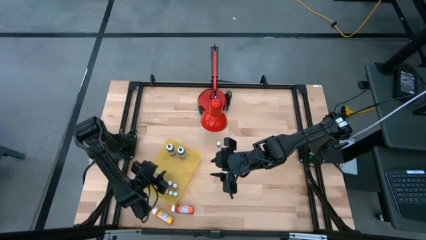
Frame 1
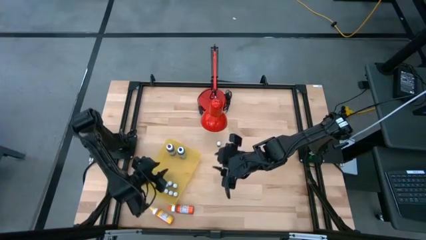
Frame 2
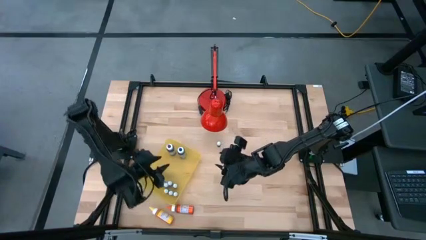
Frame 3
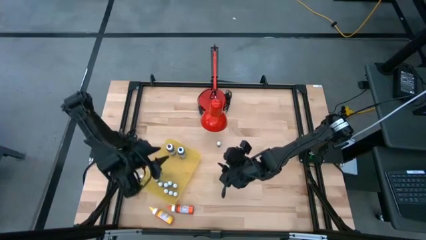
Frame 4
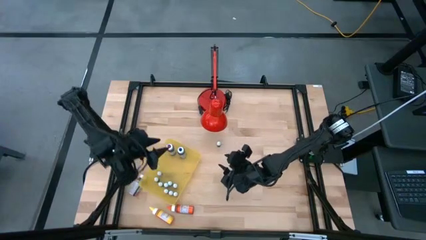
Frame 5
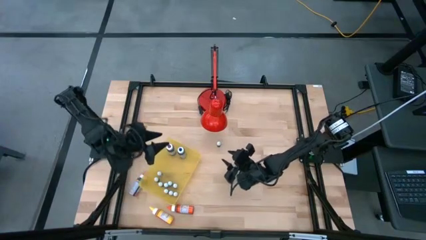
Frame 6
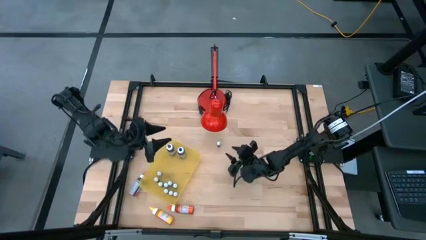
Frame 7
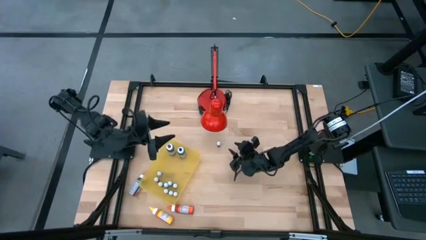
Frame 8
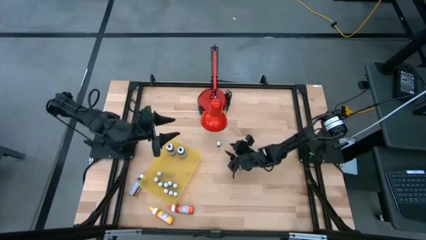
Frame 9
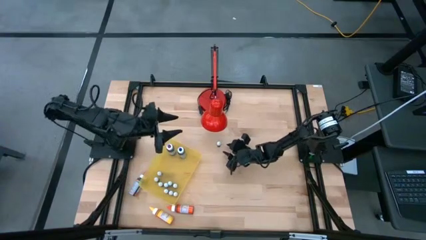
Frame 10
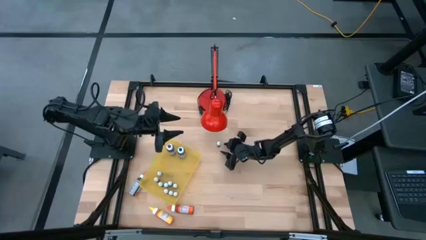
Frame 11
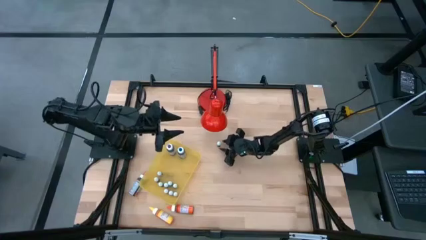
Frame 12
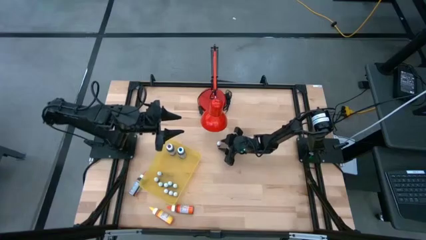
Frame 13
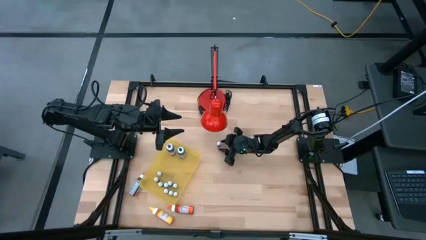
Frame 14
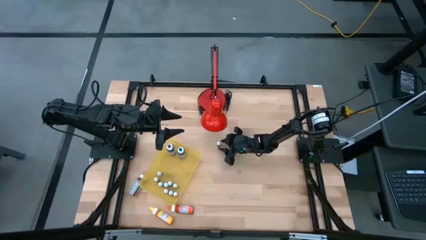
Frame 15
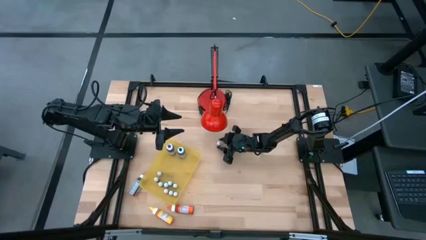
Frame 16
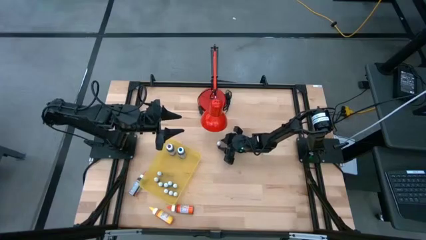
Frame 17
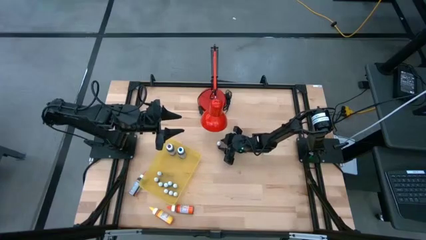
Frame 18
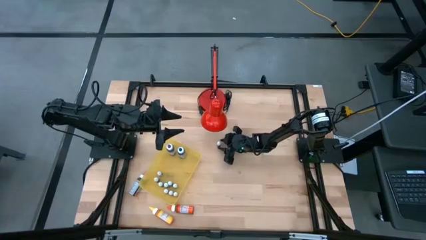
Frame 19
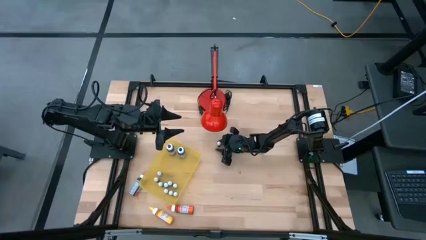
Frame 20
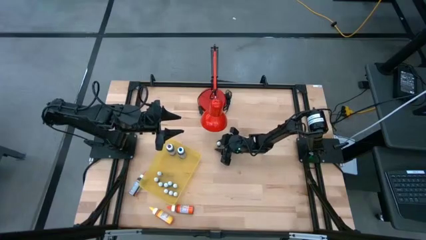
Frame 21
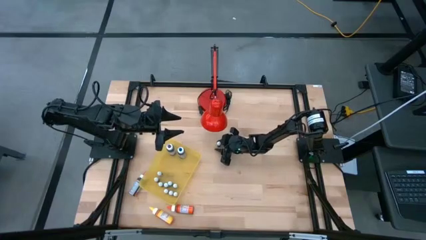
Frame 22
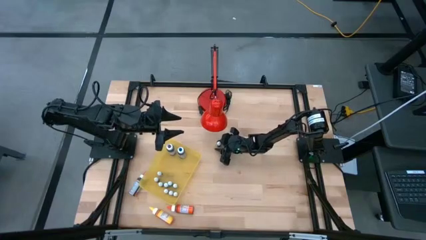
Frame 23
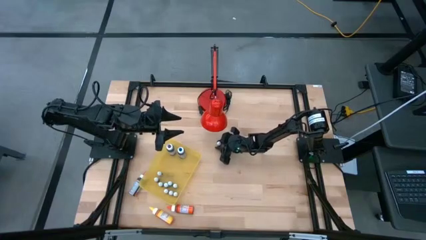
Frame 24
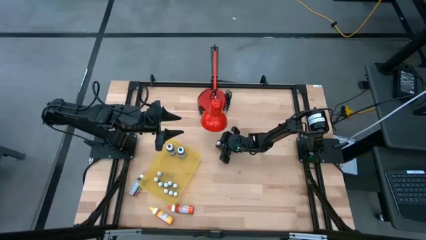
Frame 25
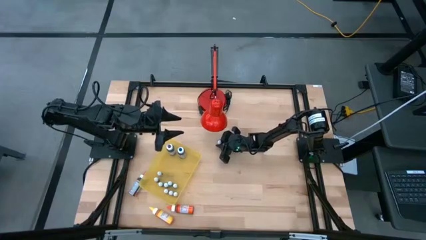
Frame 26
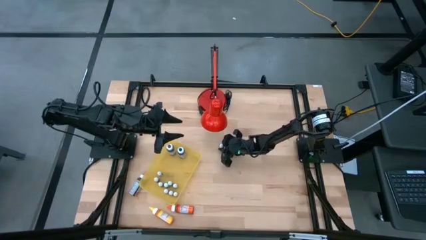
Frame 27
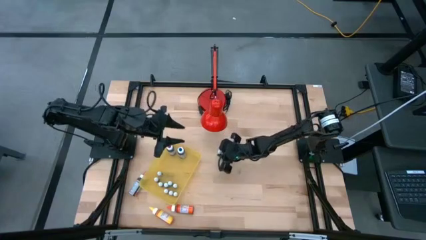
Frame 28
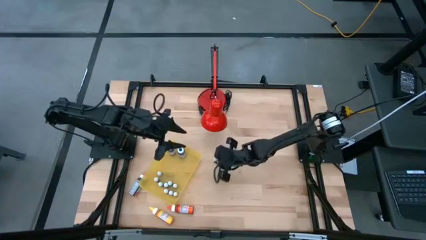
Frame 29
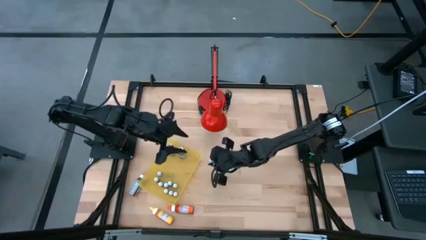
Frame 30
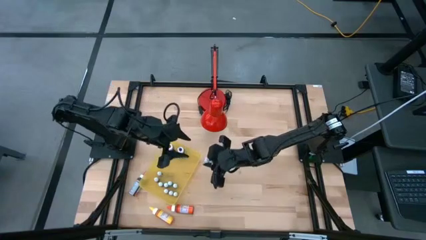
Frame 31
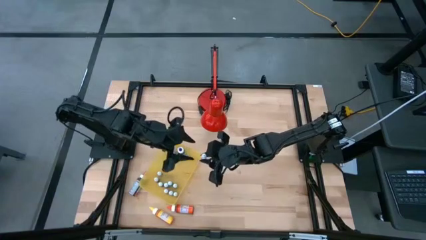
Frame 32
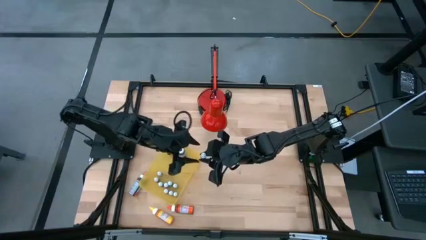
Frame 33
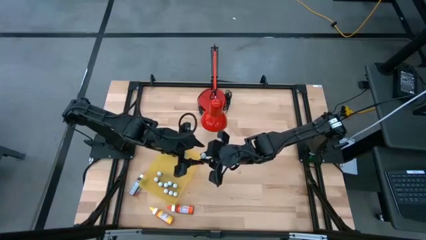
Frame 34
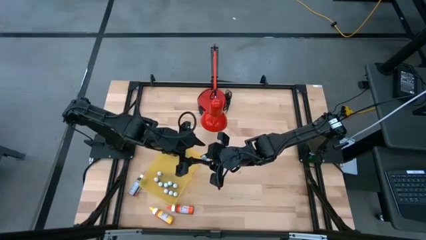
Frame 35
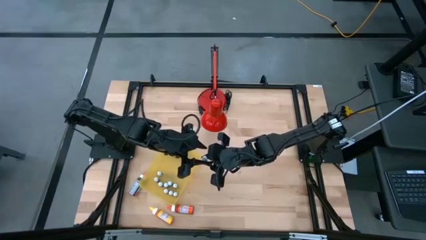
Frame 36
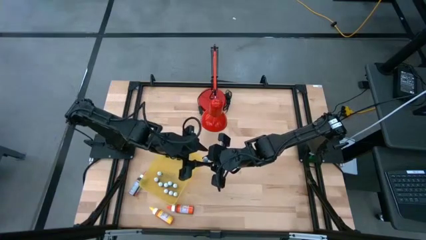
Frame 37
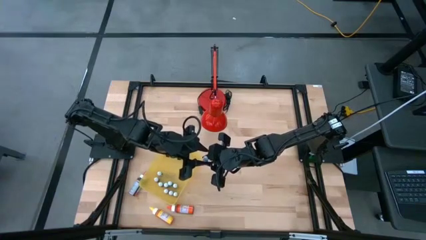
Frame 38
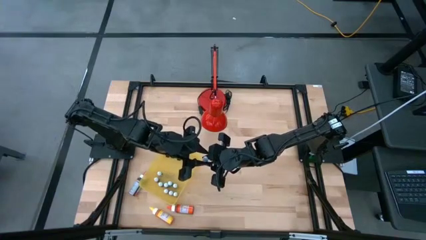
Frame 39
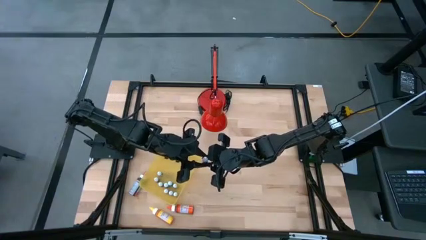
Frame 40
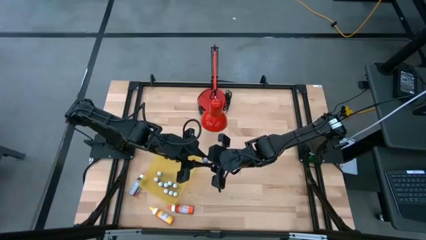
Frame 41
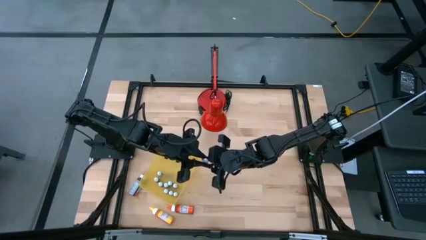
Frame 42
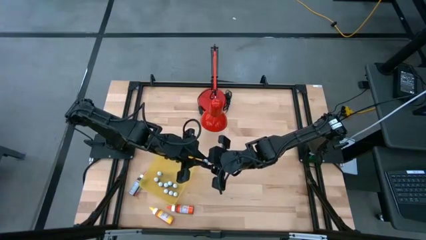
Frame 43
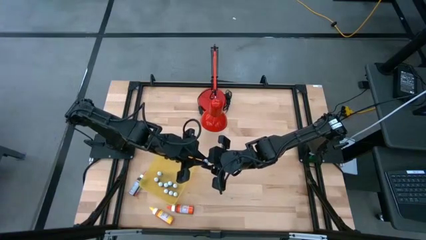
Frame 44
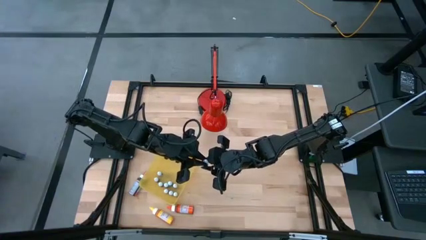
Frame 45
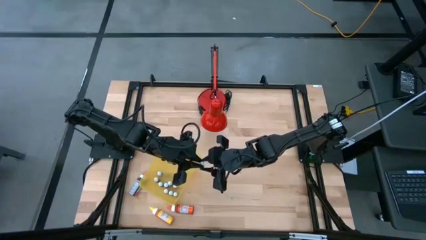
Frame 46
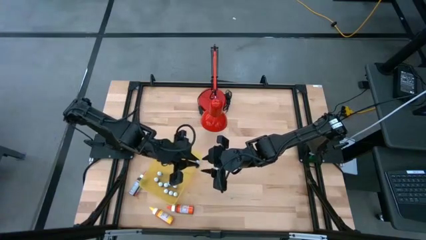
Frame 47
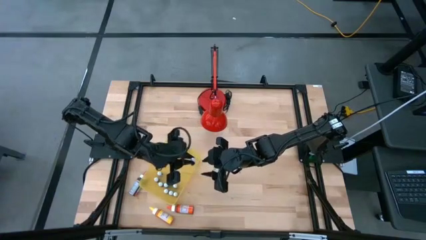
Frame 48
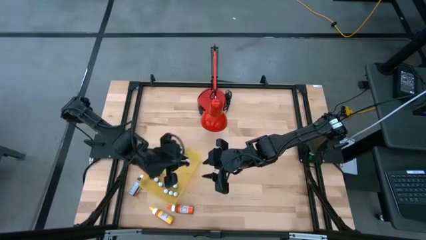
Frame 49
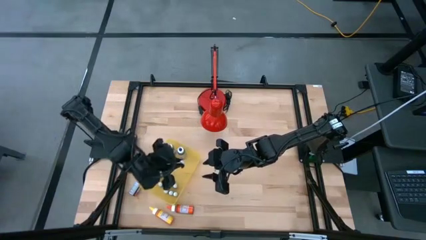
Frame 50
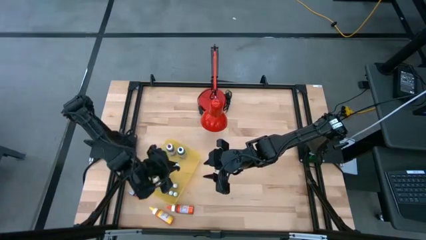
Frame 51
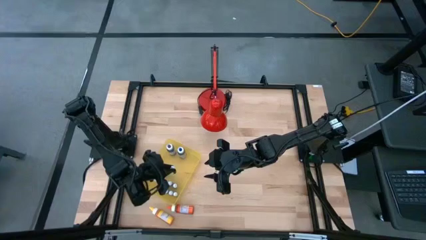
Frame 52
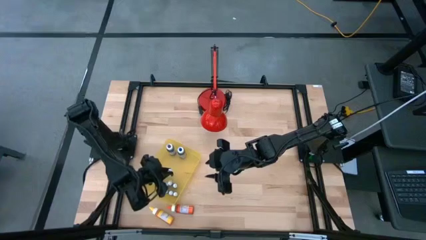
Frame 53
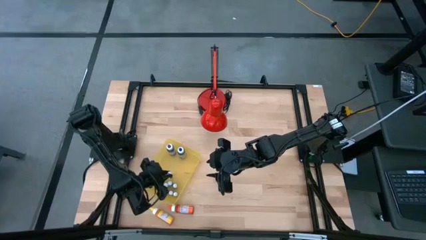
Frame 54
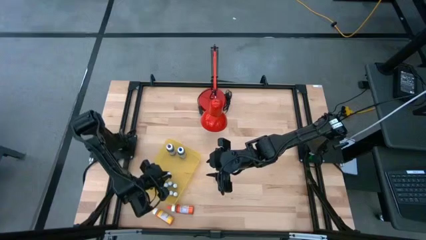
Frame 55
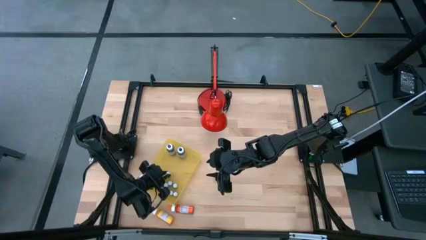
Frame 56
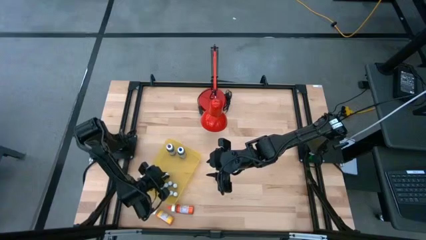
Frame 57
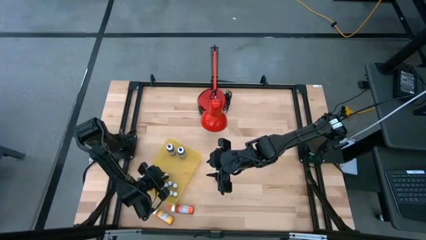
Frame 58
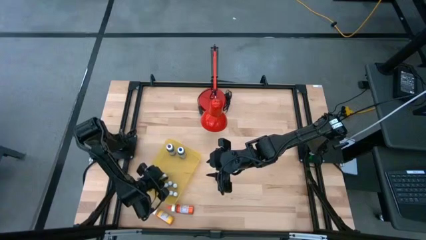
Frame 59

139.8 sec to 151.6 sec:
Task: Pick & Place food coloring
Put the small light green food coloring bottle into the yellow bin

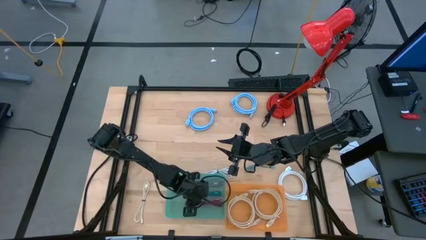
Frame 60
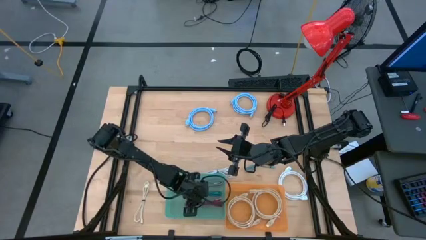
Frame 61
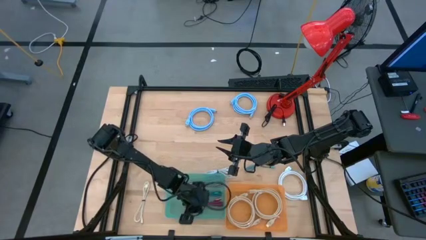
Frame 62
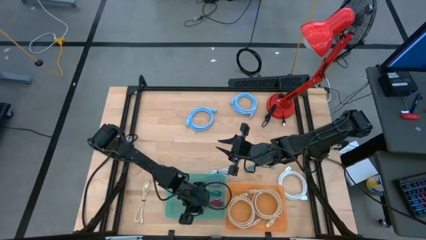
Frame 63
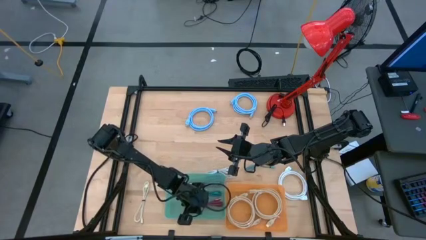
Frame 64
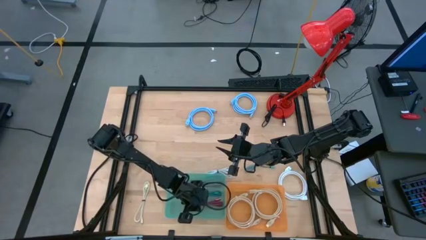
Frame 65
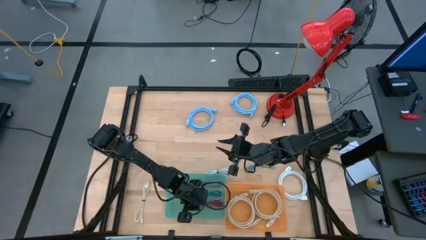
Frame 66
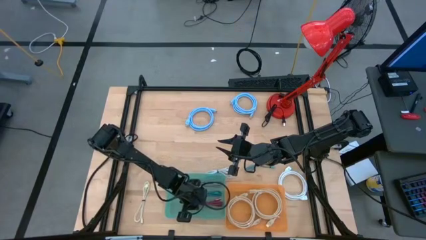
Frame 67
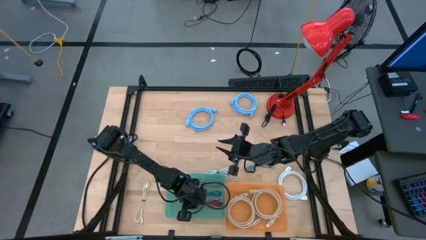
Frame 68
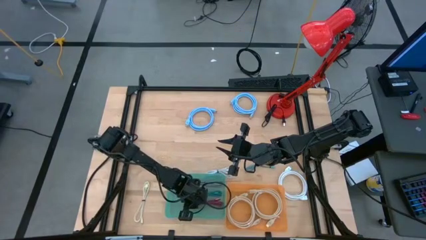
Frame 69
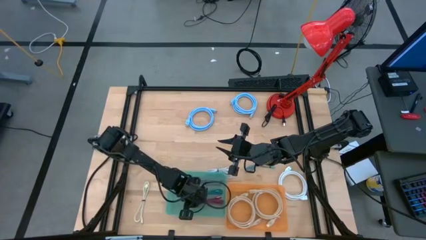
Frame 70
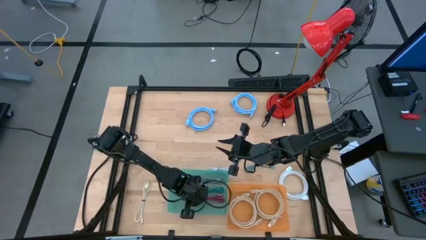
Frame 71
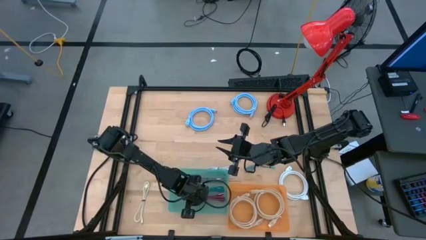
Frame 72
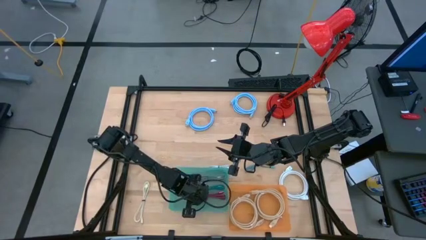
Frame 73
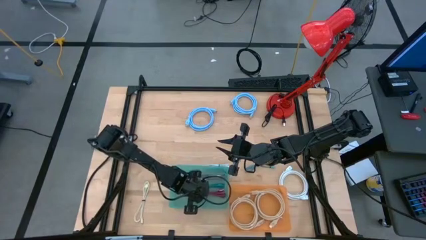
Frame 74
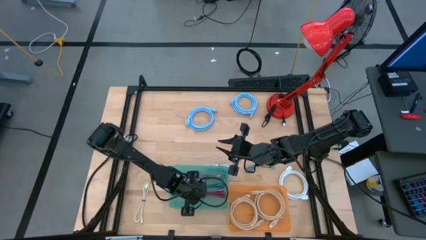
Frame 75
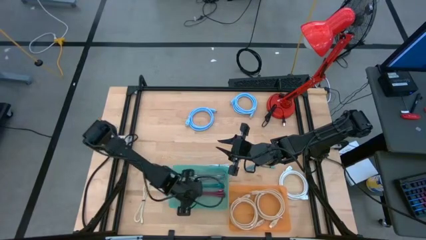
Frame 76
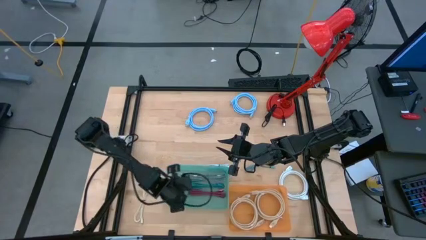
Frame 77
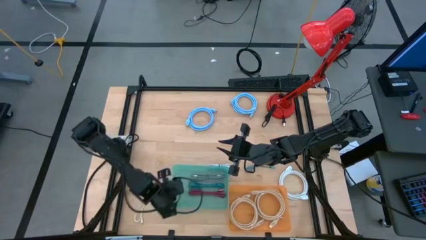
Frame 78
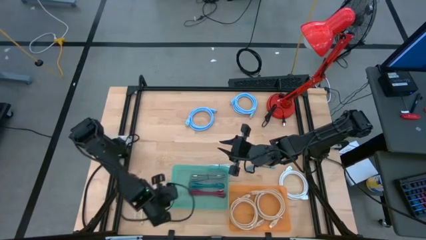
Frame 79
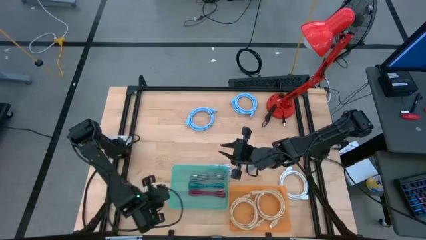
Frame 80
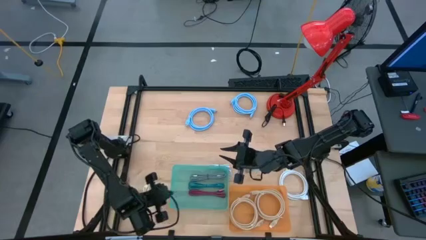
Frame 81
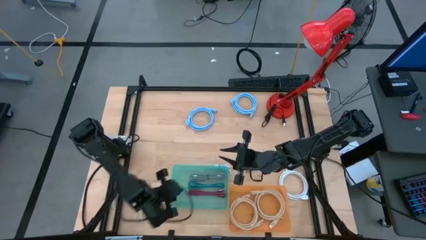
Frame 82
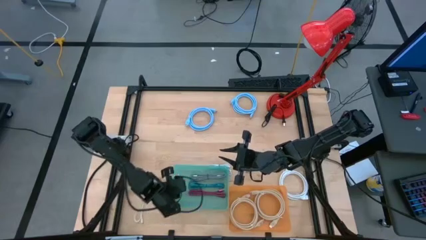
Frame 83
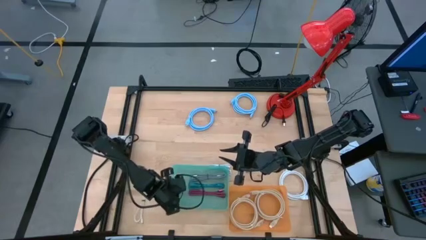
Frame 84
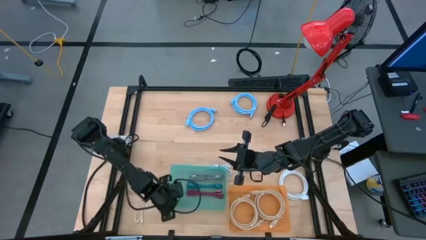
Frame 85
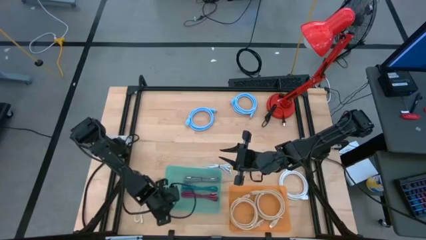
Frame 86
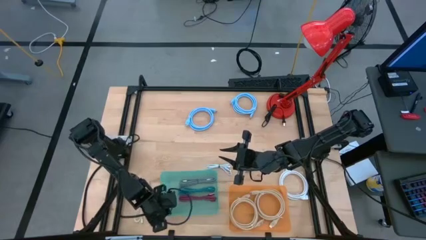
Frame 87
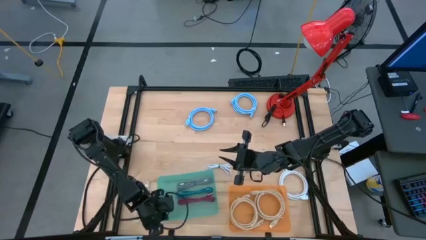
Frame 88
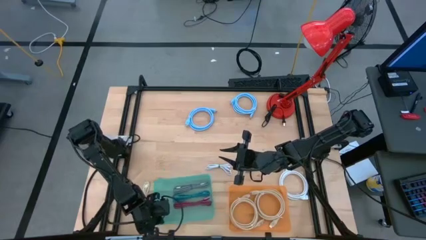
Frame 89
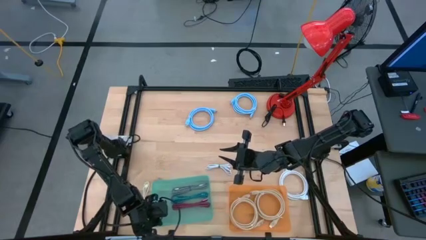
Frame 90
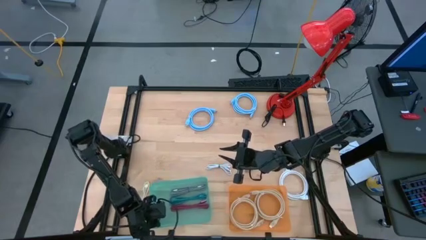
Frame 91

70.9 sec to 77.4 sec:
Task: Pick & Place USB Port
Adjust the green bin
